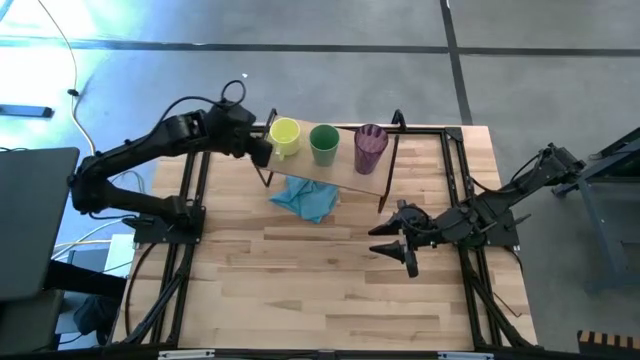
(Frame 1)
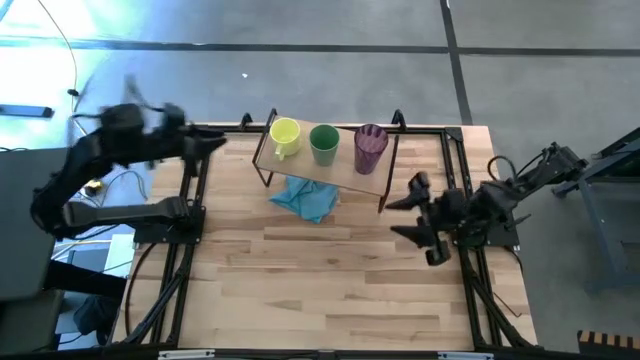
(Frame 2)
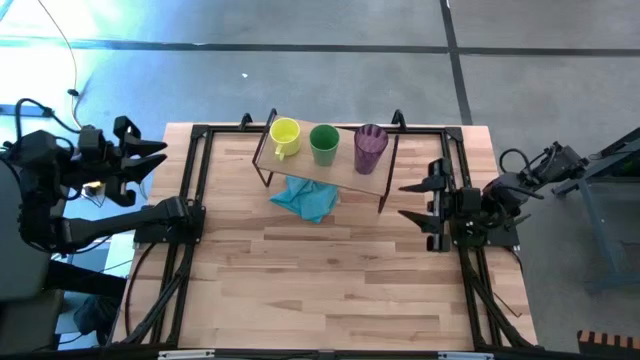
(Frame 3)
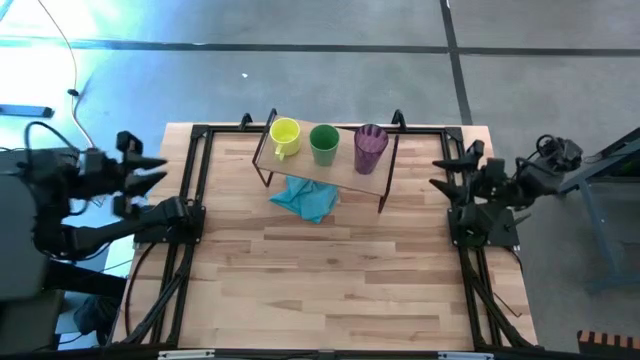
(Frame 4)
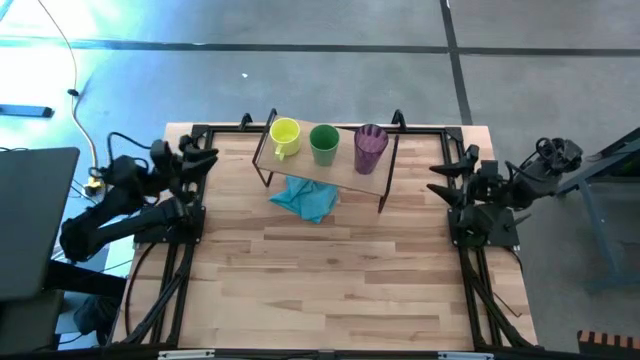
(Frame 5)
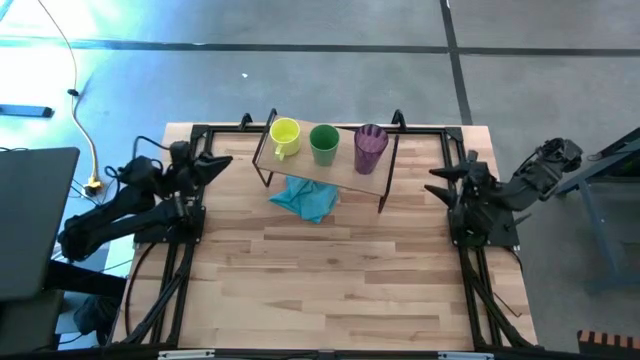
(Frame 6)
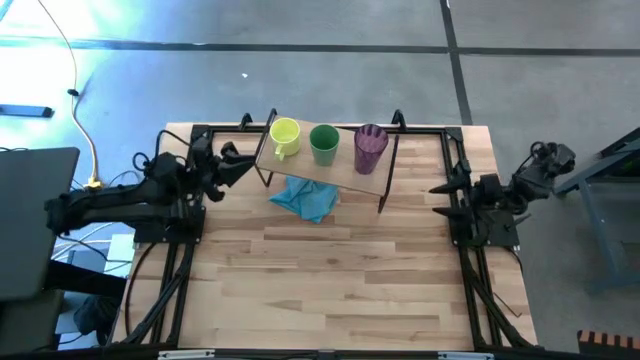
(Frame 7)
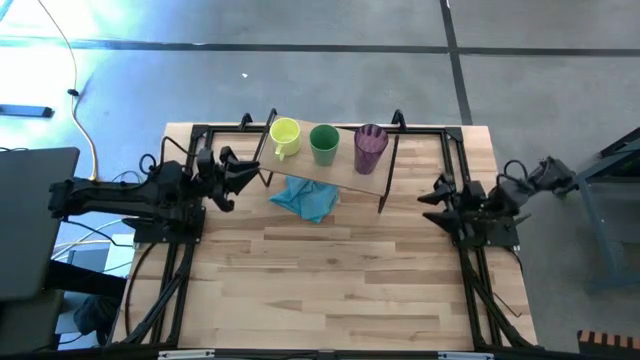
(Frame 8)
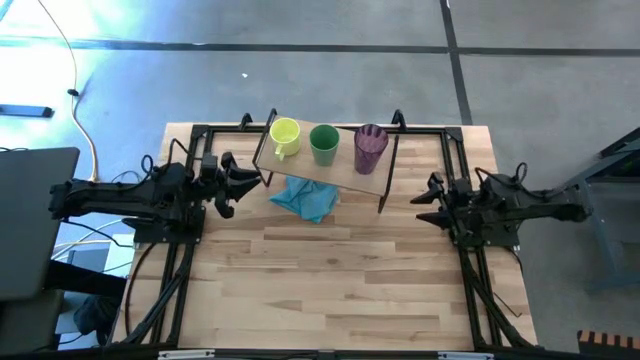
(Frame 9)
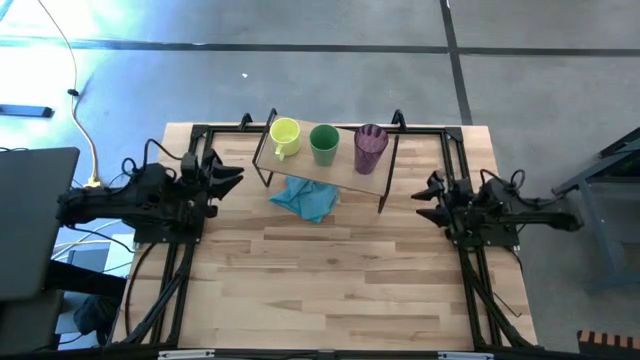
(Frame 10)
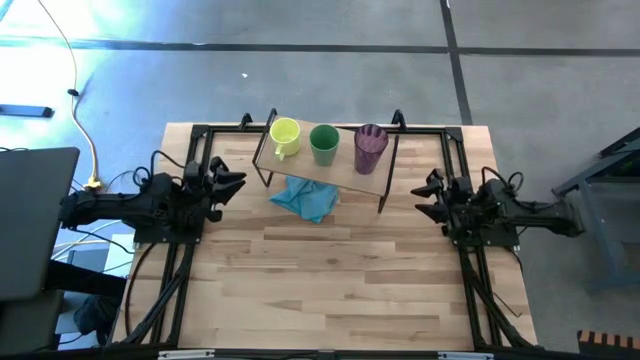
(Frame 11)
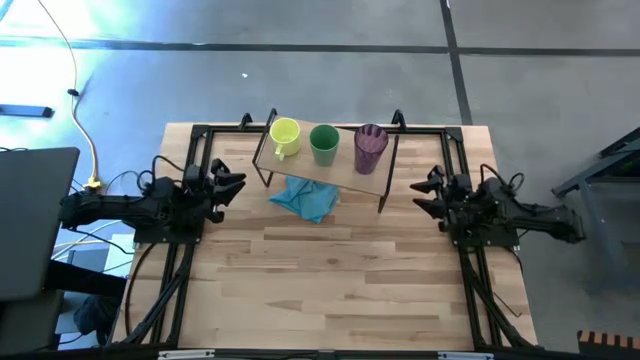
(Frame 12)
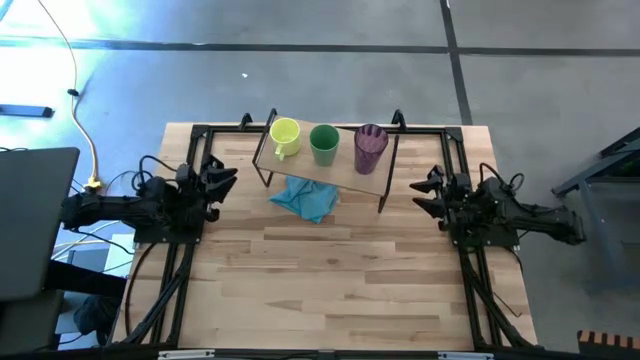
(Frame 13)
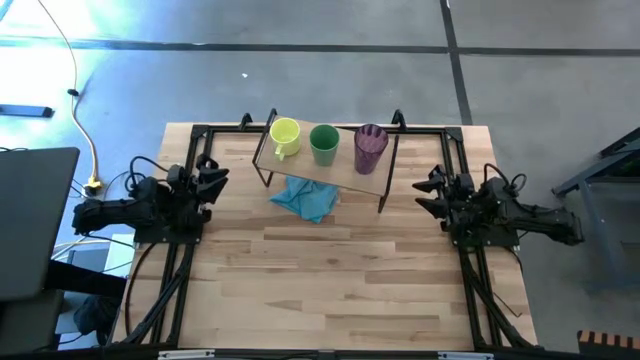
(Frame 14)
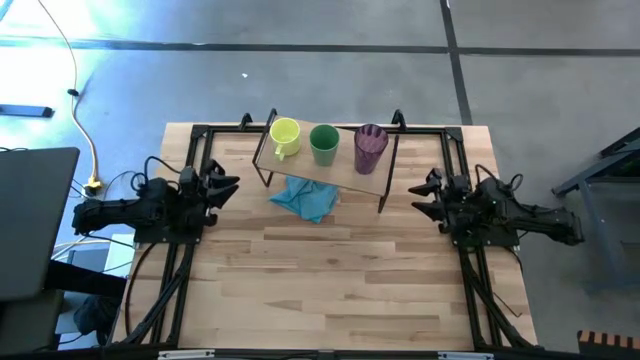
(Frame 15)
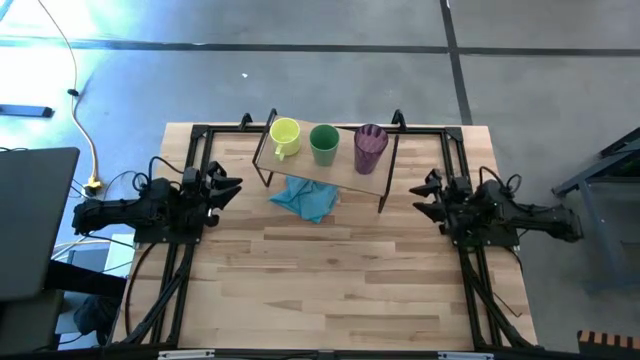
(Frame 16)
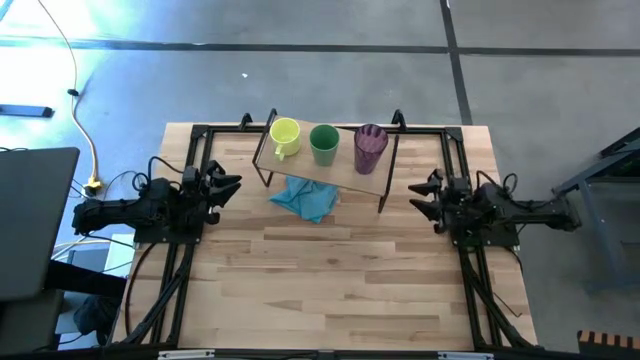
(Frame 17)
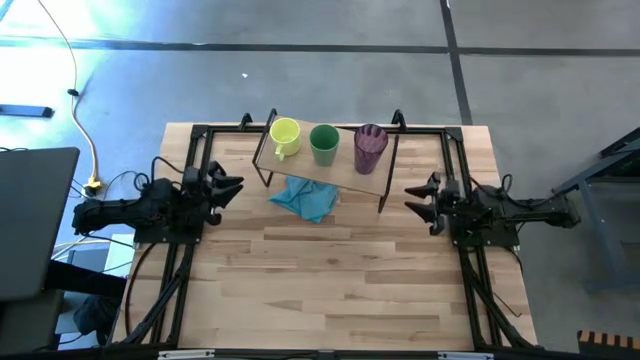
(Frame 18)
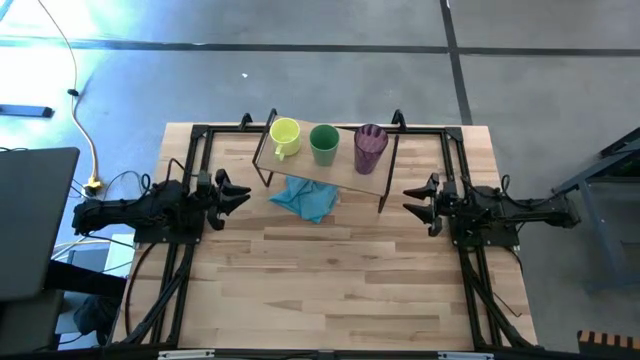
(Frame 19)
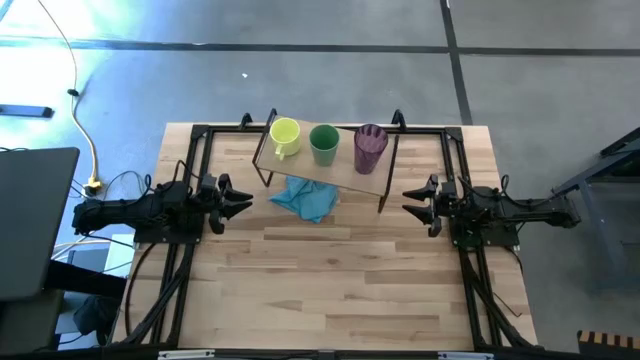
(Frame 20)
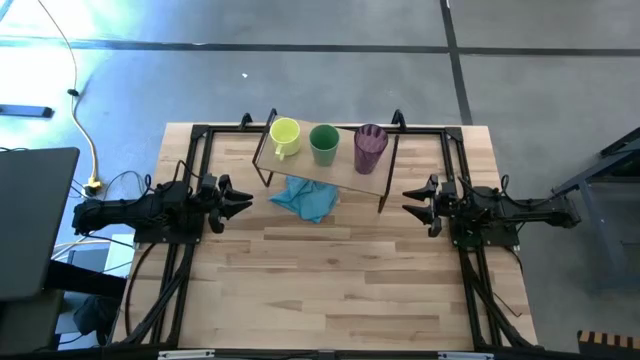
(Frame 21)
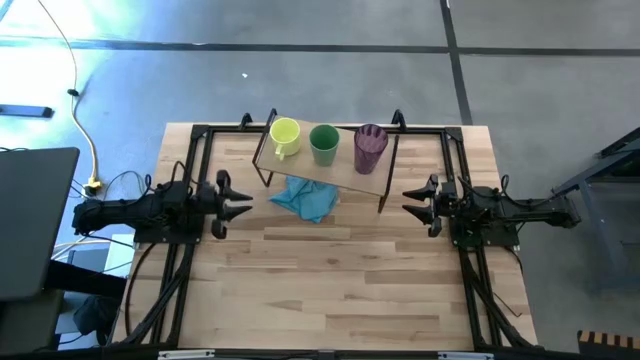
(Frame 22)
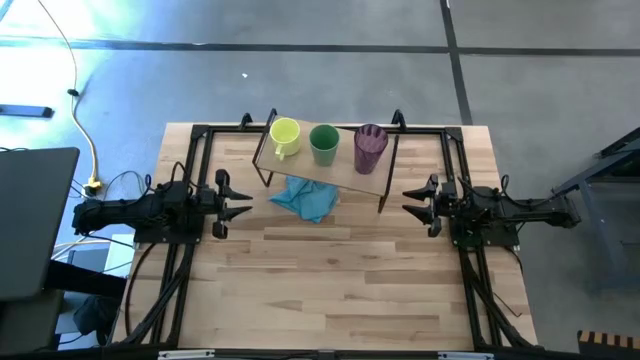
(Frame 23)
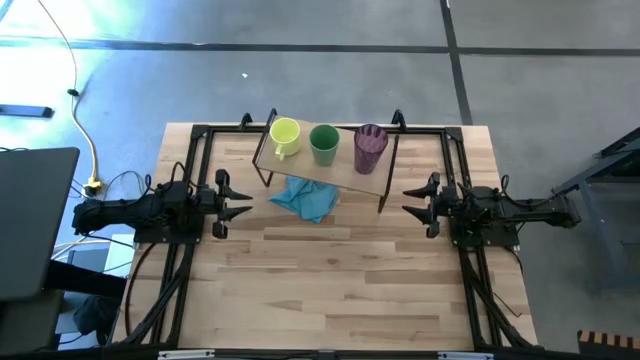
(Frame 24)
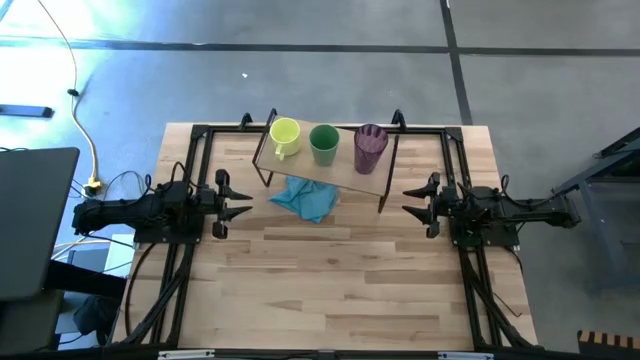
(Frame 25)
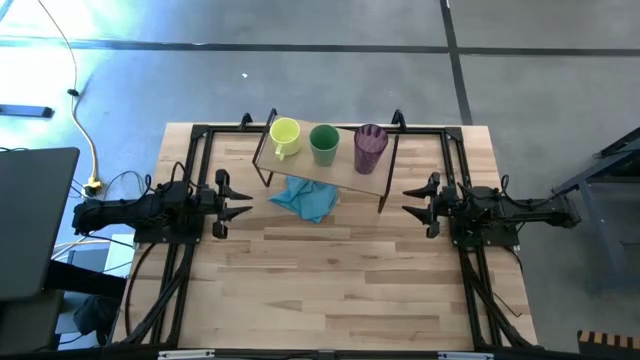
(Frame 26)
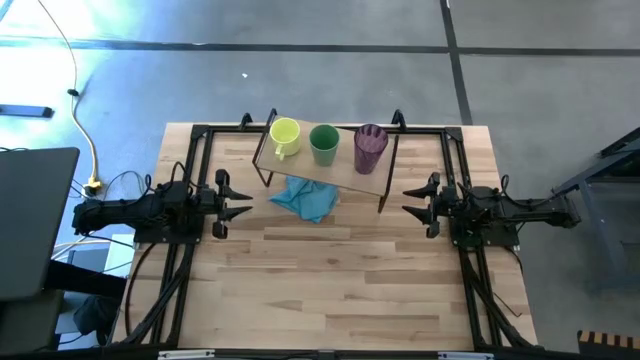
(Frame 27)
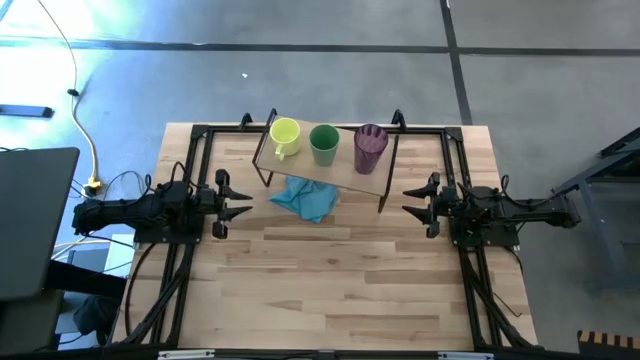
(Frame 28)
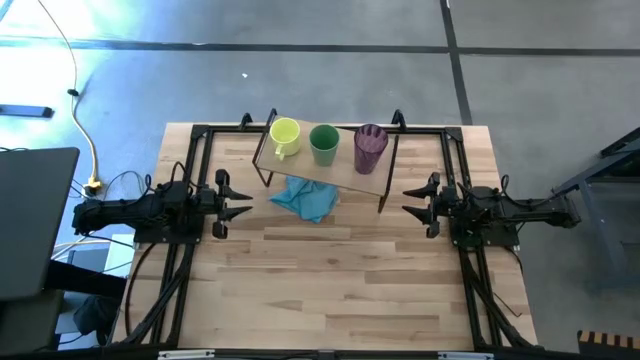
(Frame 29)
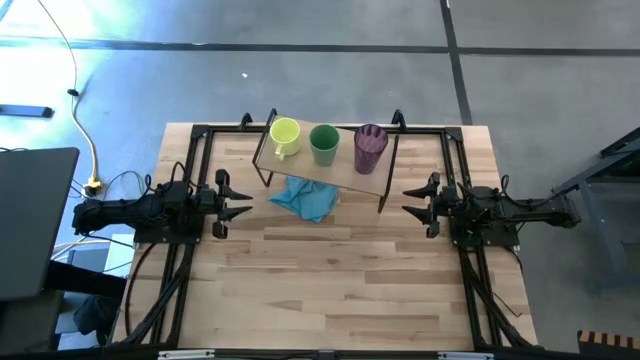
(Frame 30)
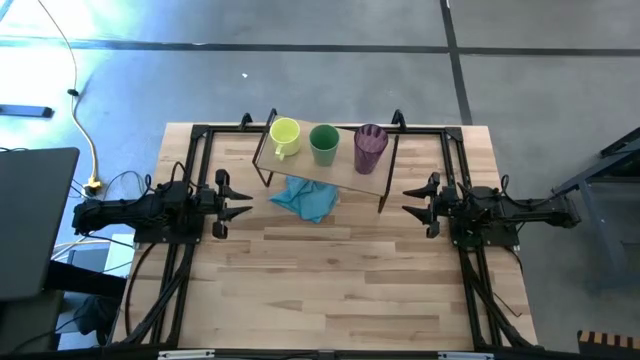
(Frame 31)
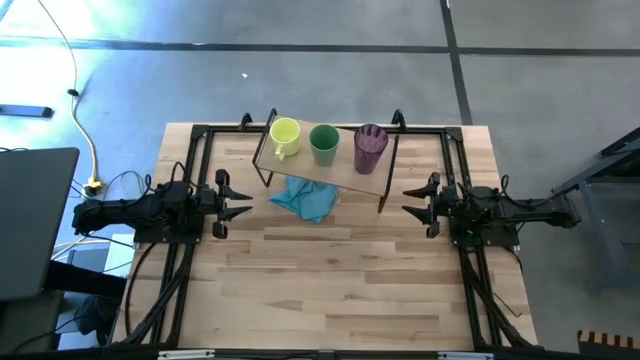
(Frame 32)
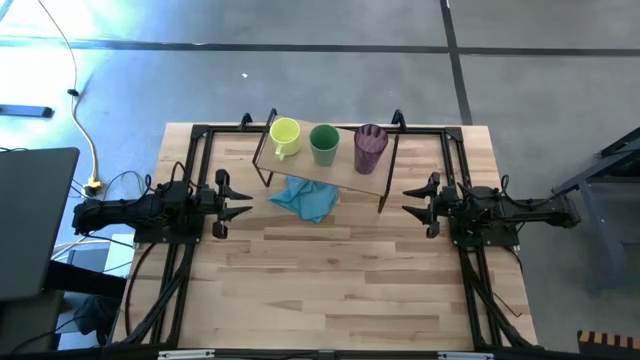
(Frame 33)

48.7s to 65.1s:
Task: Stack small to large cups/mugs on shelf
Return to Home Position

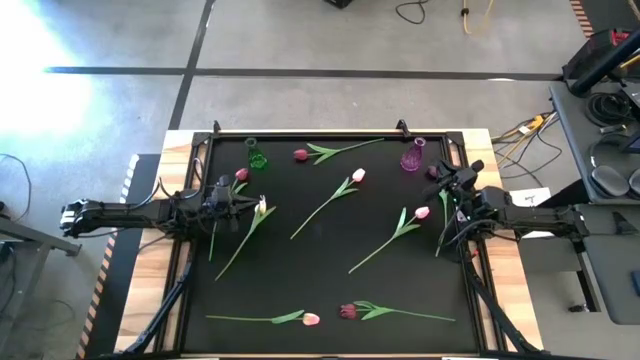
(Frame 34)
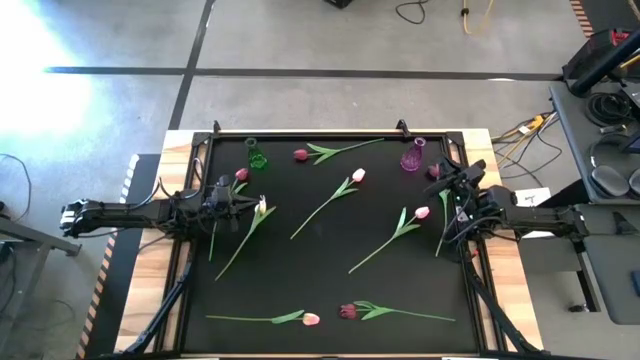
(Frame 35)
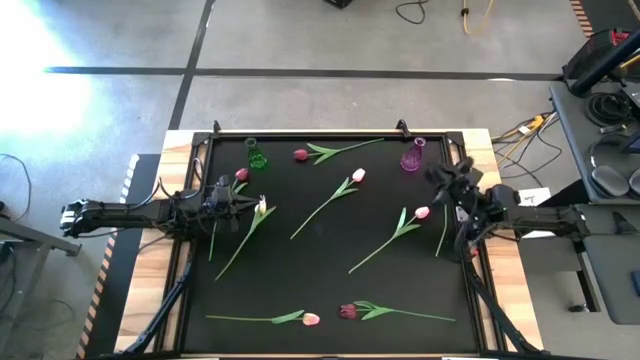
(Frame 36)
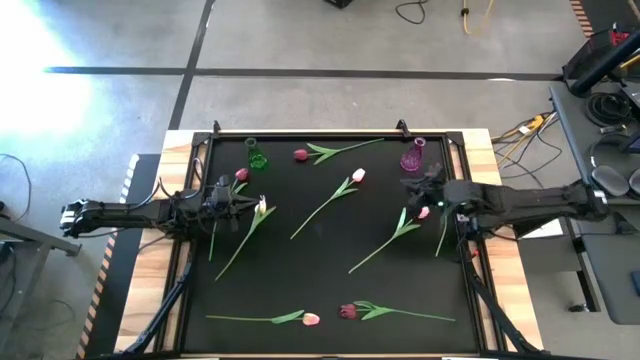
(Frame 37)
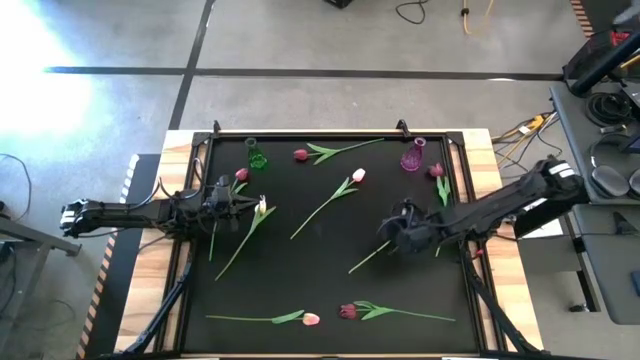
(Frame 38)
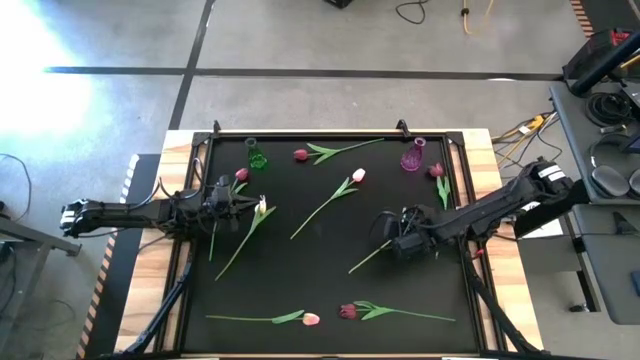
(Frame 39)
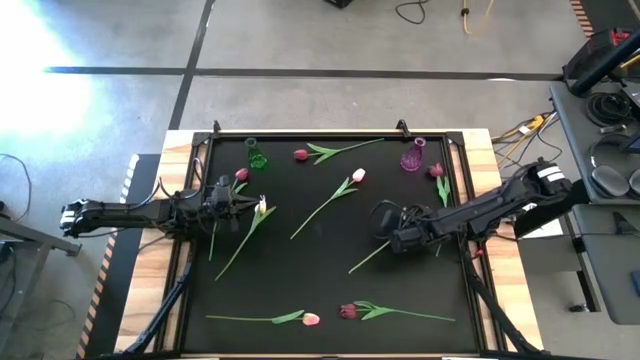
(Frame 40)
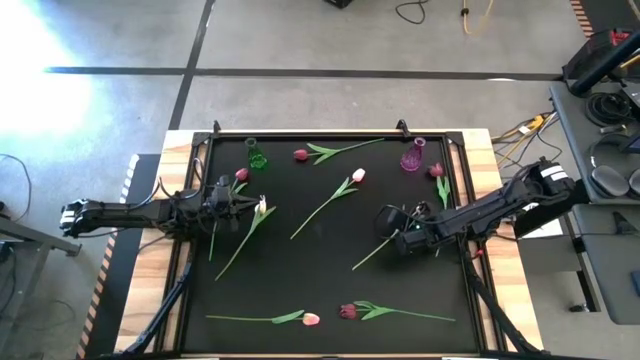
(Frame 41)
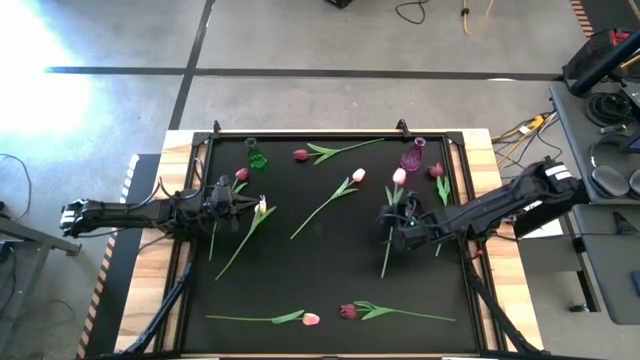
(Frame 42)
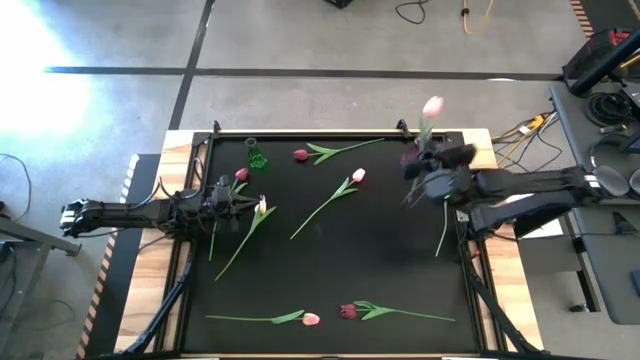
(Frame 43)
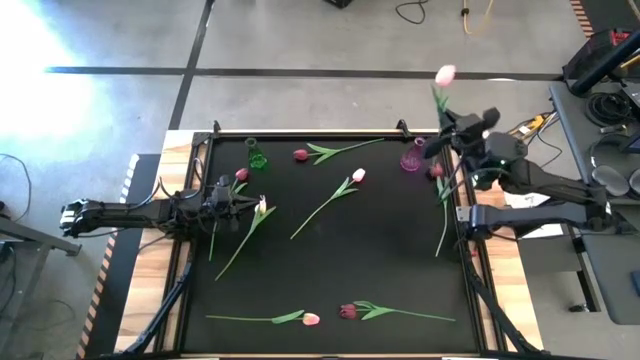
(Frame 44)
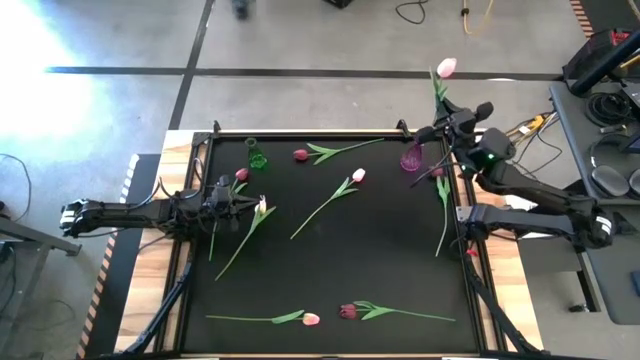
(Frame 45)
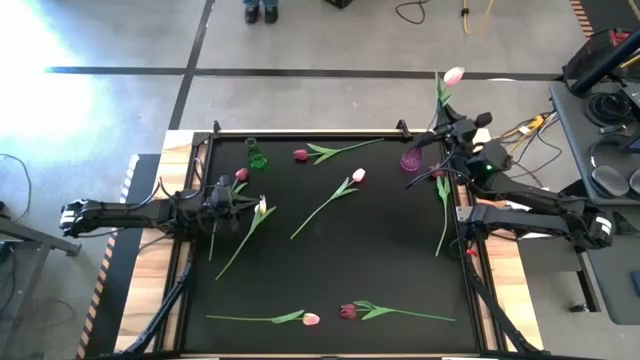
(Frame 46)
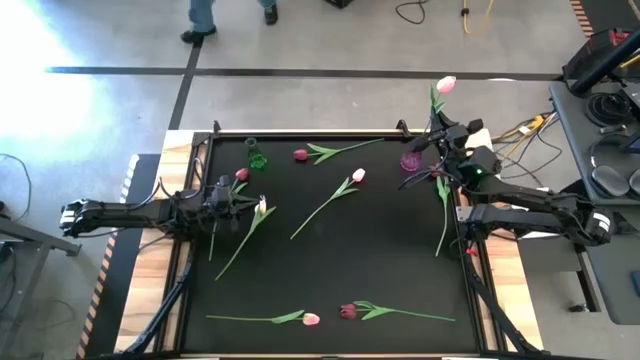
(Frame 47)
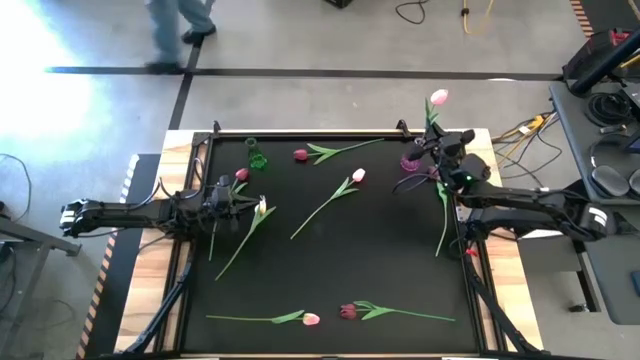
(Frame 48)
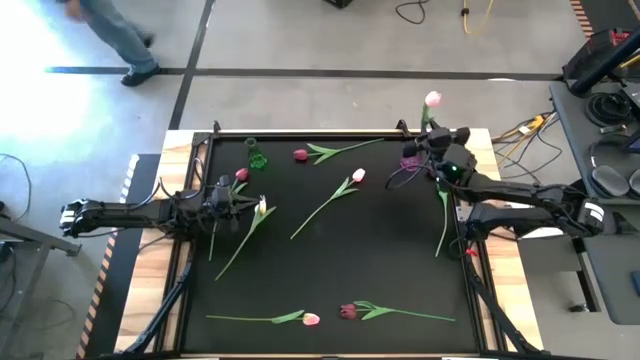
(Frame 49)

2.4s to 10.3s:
Task: Sort flowers into vase by color
Put the pink flower into the violet vase
